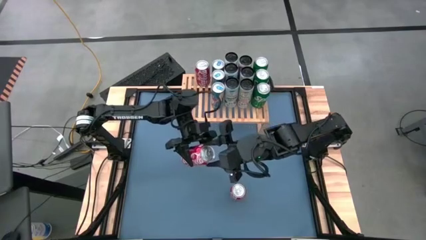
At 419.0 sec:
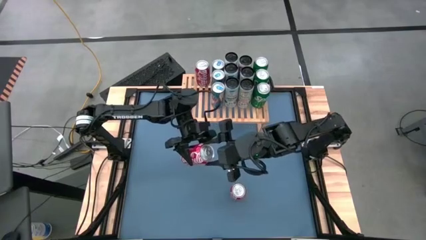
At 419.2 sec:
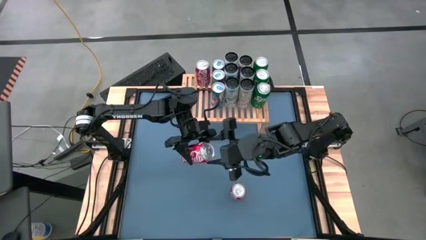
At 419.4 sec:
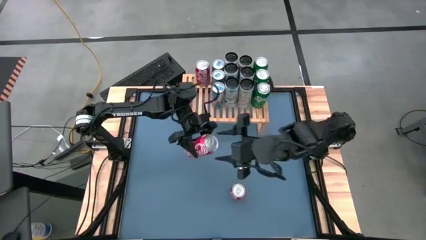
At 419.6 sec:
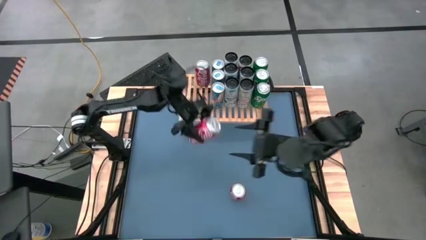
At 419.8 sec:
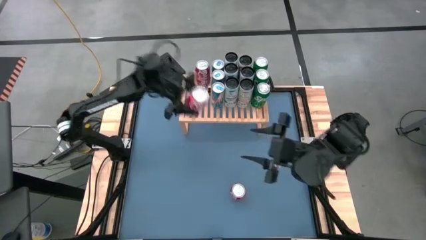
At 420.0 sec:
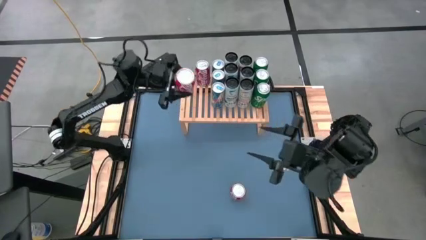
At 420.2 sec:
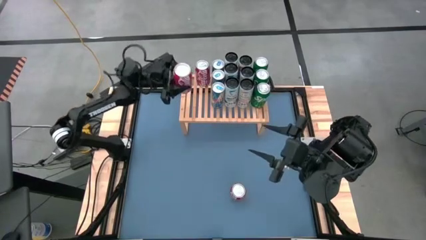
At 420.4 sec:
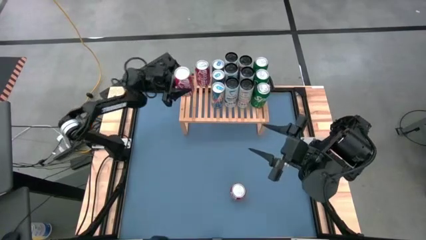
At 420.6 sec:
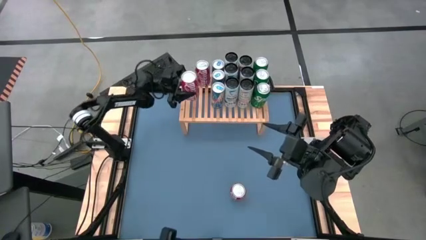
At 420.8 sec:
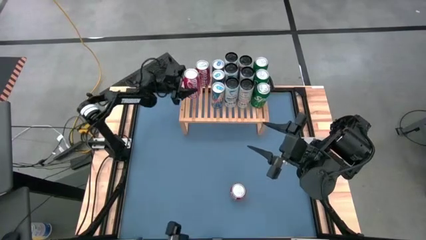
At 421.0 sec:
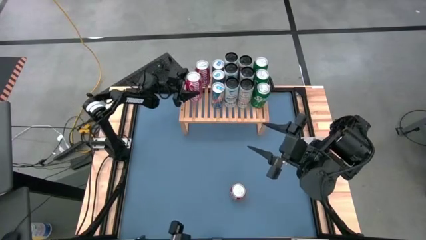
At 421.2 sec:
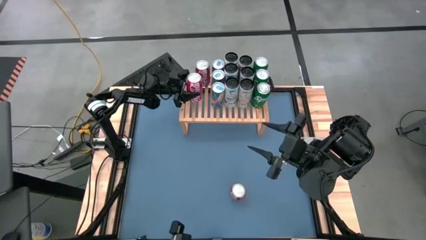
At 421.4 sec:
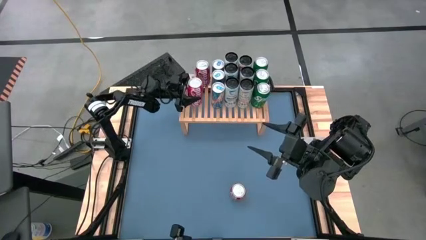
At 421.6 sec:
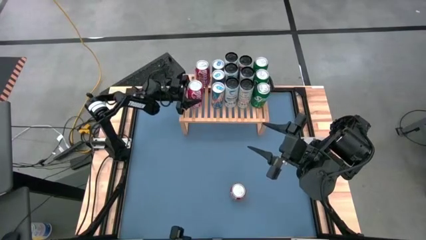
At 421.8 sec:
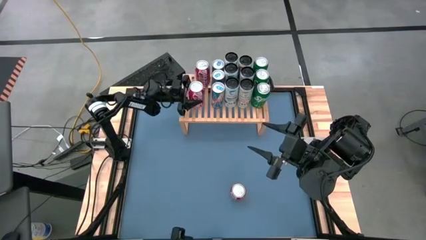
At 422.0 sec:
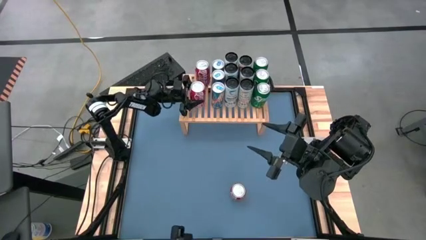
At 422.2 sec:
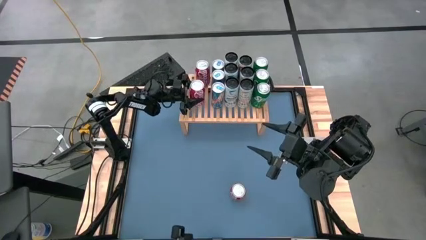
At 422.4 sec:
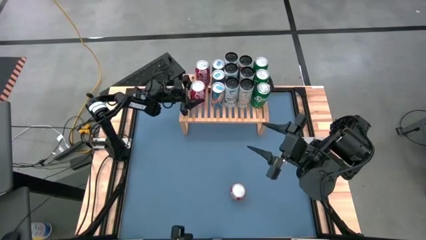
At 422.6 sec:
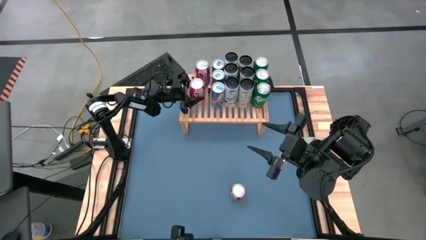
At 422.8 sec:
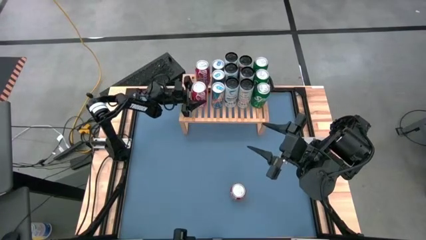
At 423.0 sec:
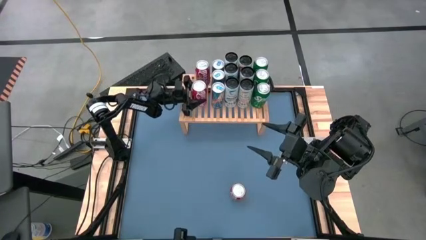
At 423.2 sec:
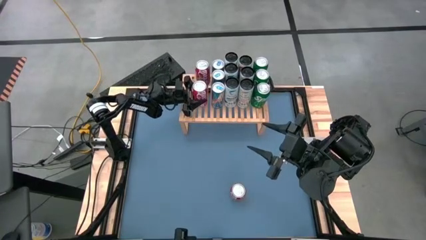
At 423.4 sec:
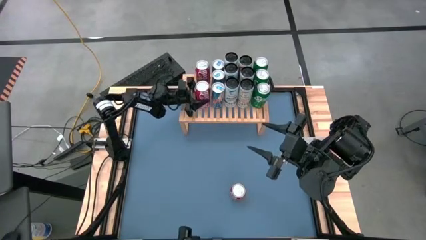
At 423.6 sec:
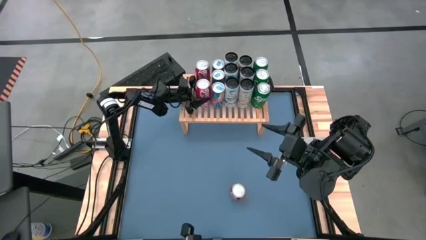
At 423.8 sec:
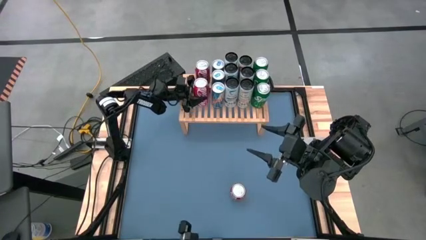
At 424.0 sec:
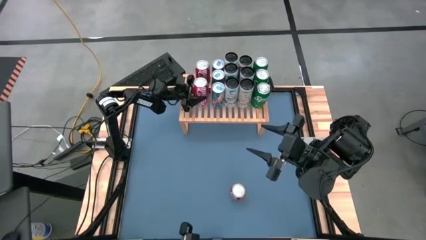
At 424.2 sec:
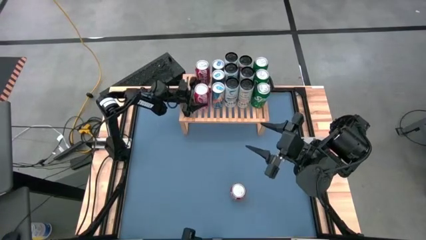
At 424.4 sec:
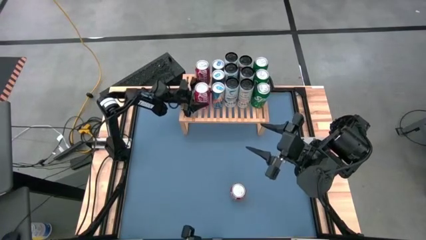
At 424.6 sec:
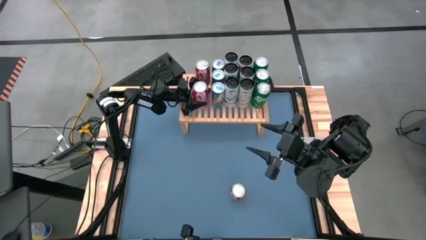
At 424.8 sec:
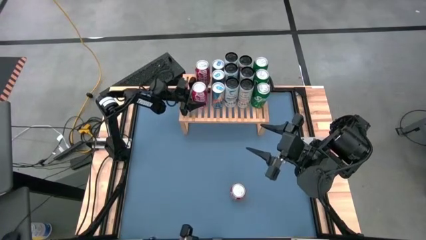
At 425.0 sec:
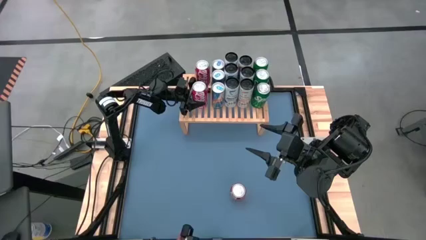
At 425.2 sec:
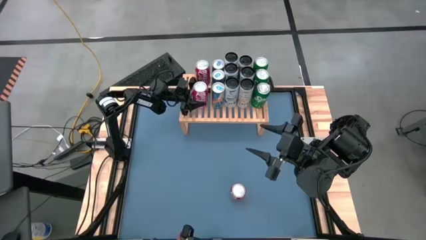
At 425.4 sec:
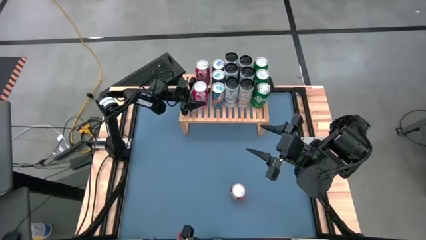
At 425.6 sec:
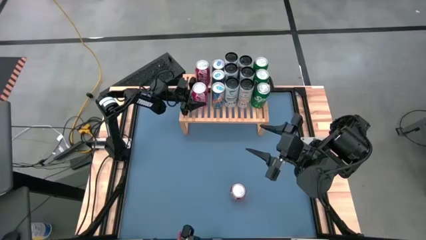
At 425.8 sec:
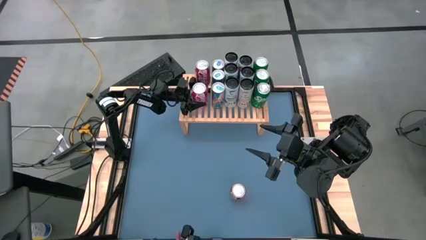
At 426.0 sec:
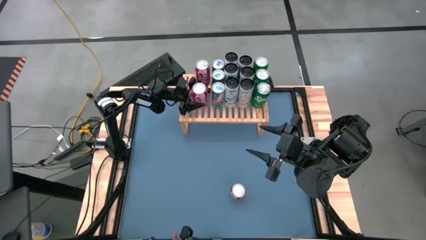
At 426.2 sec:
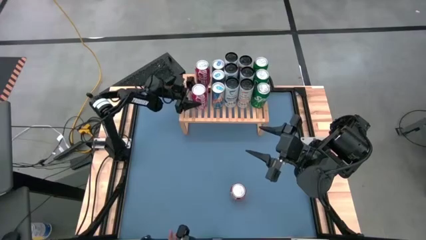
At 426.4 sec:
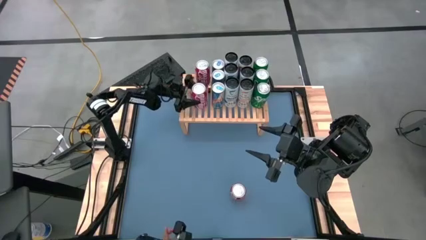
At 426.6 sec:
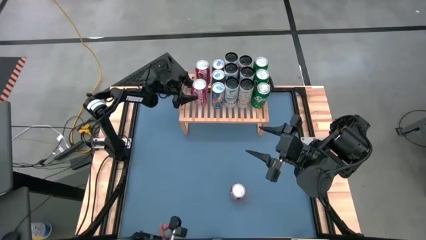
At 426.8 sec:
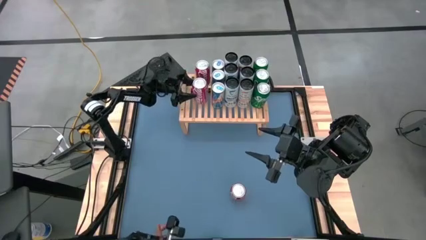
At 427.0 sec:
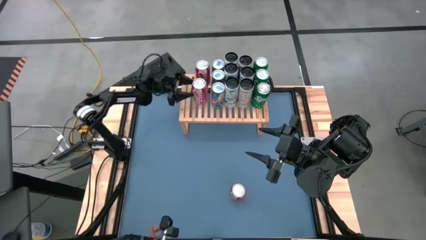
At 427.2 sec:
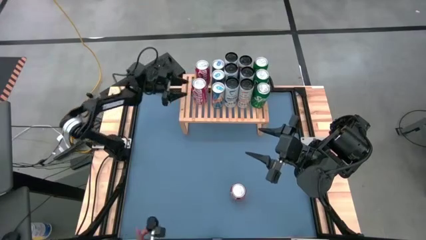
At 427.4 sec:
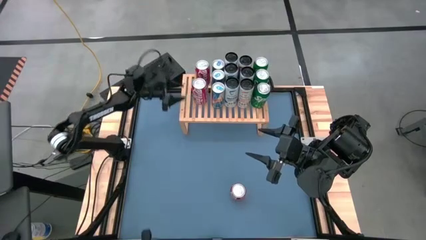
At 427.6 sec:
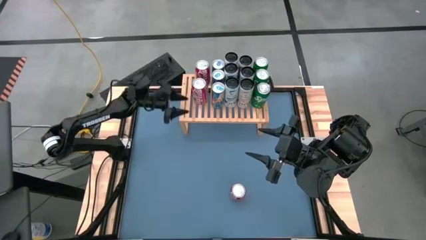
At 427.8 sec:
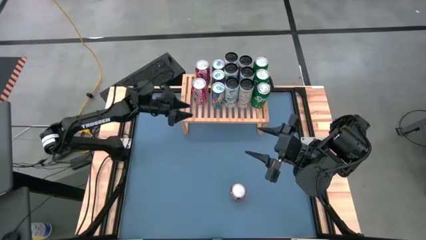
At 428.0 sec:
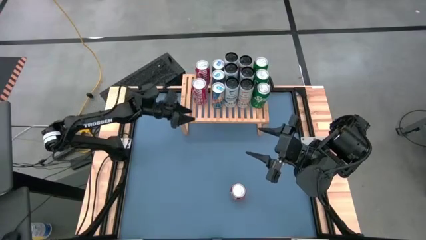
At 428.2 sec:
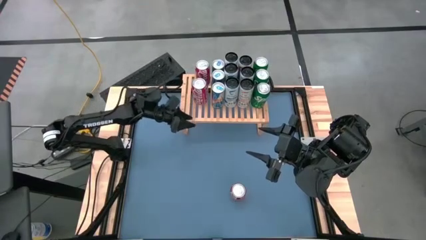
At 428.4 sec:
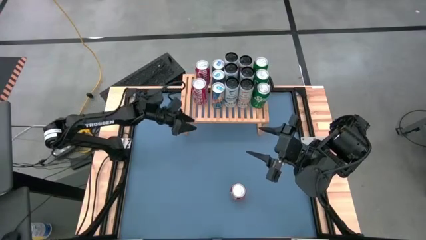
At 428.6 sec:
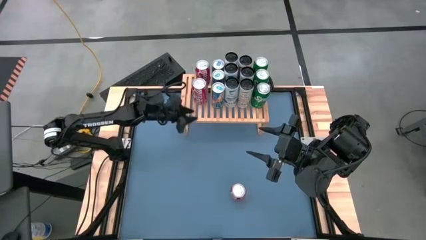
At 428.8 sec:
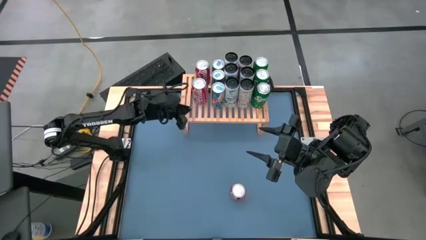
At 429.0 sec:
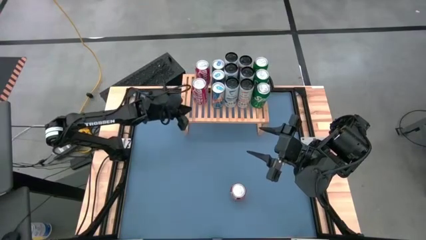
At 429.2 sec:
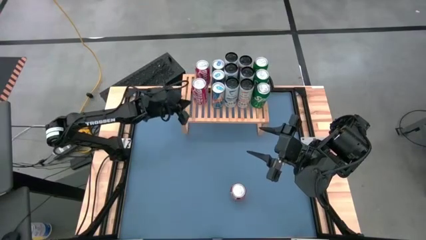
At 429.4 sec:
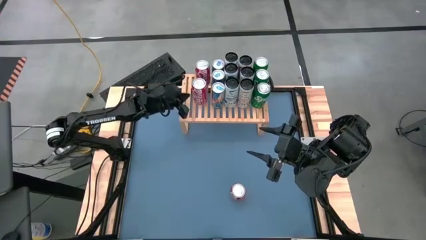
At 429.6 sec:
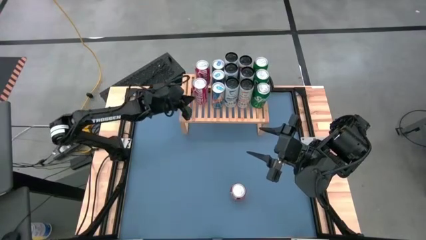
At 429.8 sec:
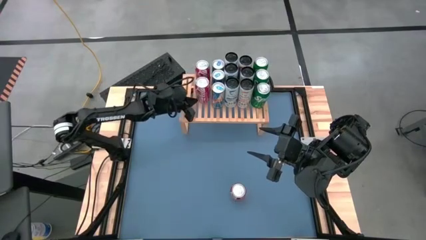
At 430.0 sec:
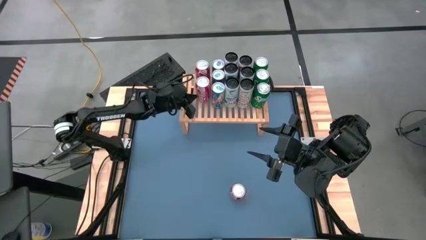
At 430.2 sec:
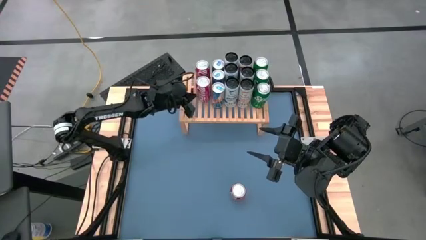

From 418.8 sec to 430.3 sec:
Task: Place canned beverage on shelf
Put the right red soda can on the shelf aligned with the other red soda can
